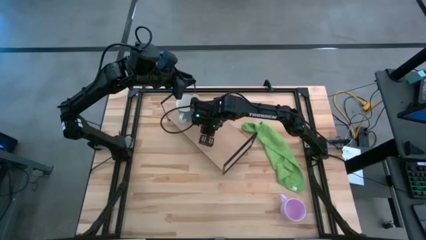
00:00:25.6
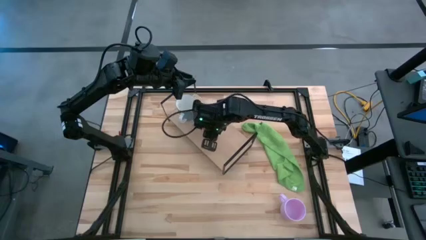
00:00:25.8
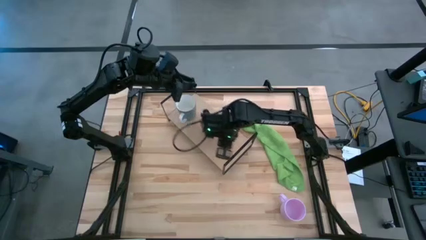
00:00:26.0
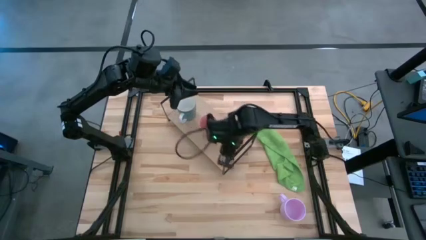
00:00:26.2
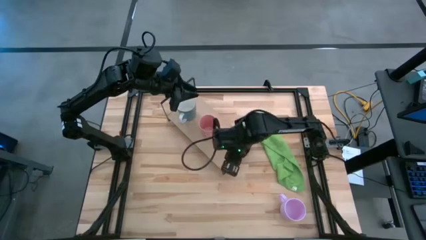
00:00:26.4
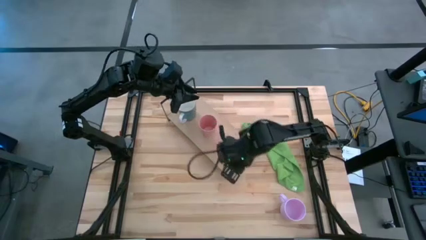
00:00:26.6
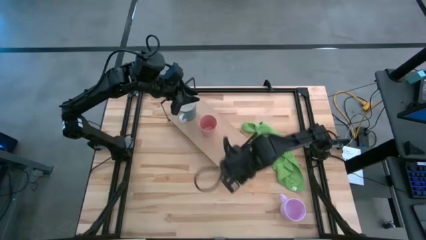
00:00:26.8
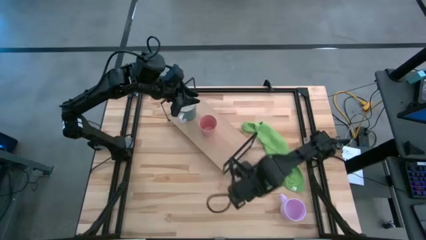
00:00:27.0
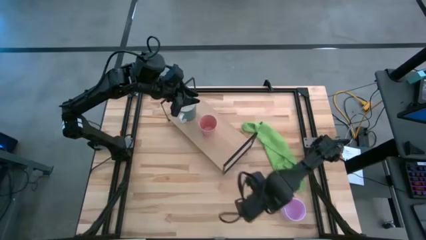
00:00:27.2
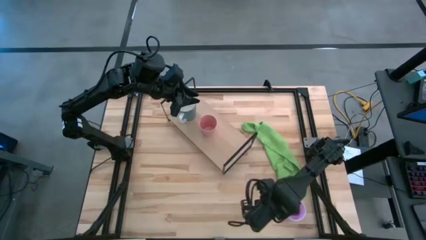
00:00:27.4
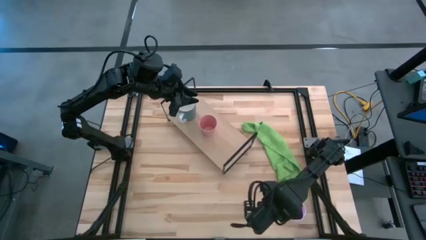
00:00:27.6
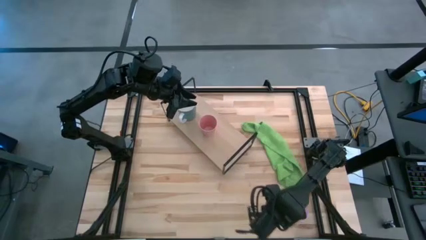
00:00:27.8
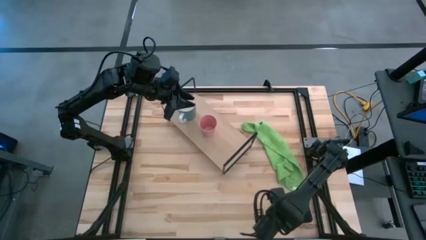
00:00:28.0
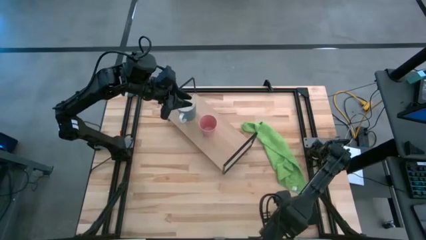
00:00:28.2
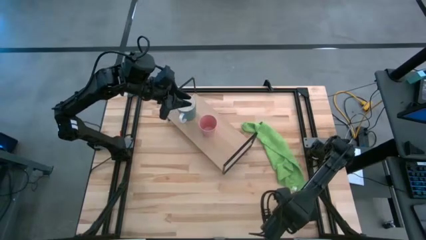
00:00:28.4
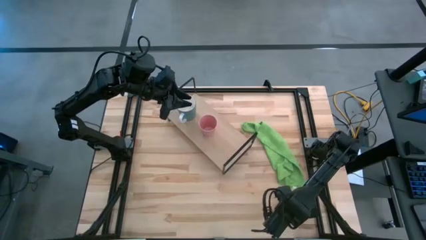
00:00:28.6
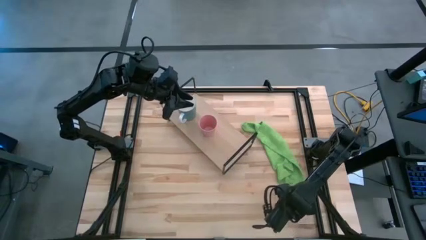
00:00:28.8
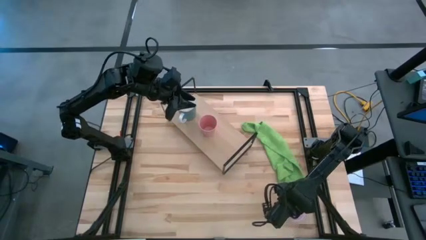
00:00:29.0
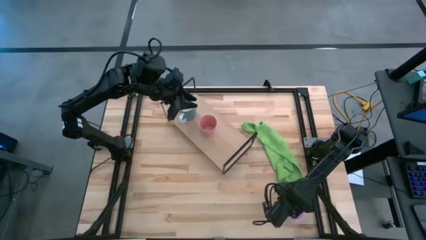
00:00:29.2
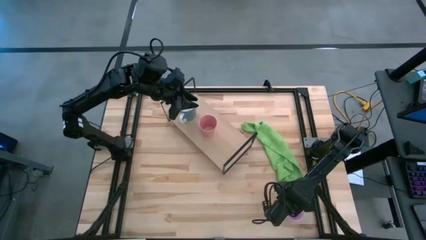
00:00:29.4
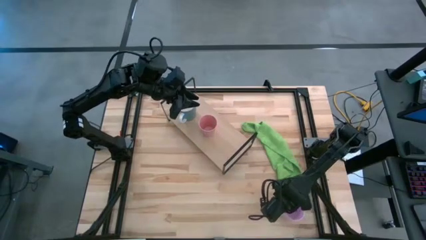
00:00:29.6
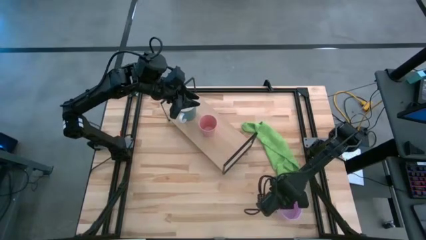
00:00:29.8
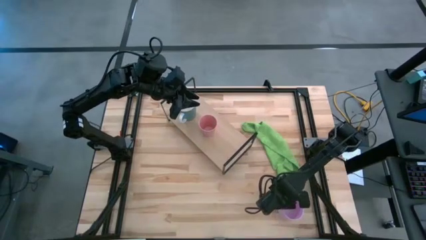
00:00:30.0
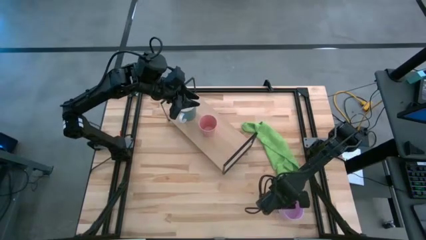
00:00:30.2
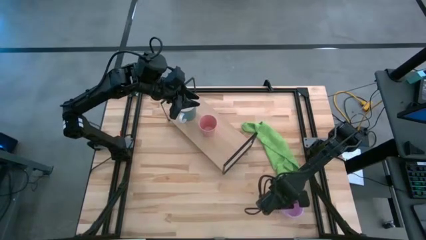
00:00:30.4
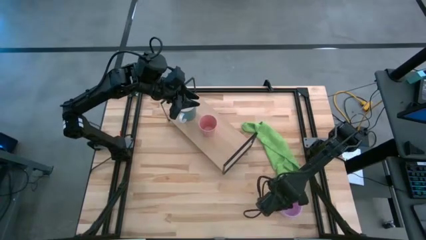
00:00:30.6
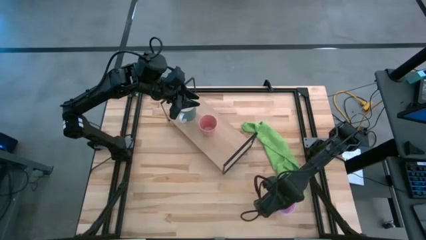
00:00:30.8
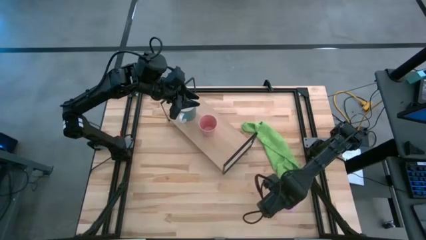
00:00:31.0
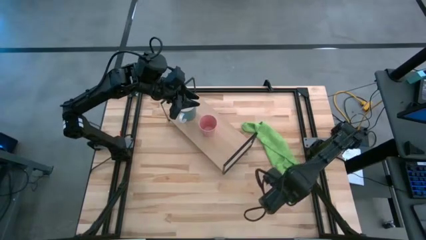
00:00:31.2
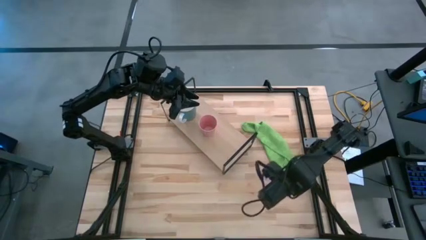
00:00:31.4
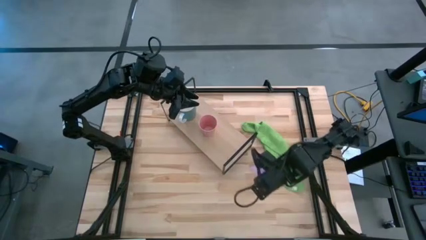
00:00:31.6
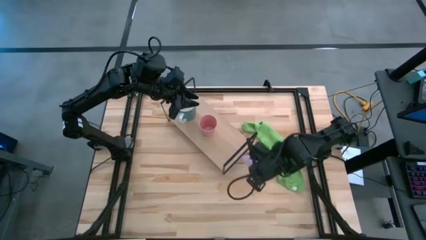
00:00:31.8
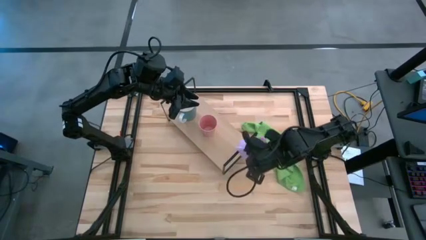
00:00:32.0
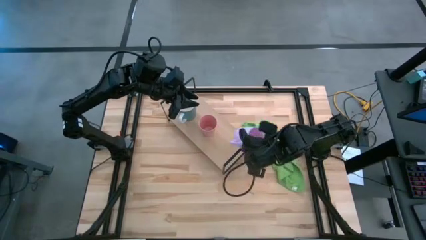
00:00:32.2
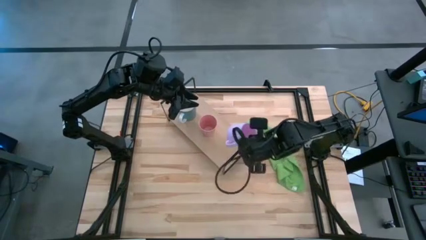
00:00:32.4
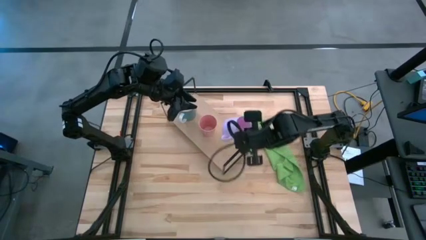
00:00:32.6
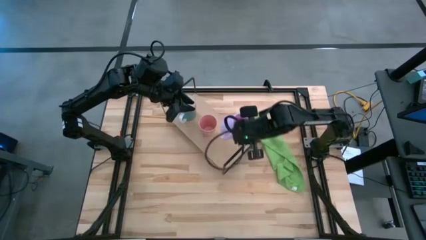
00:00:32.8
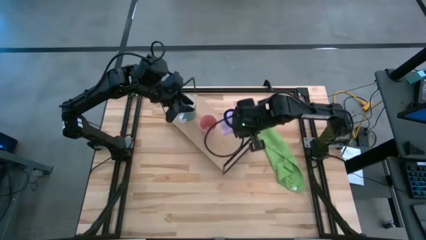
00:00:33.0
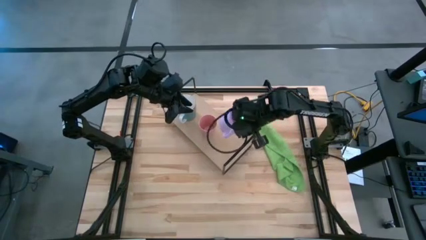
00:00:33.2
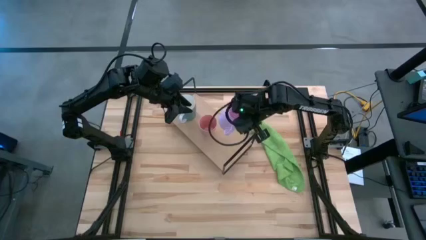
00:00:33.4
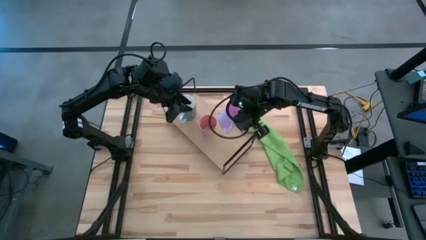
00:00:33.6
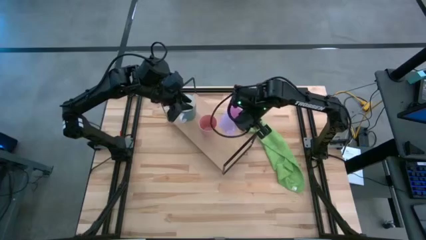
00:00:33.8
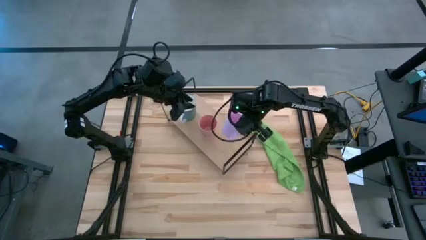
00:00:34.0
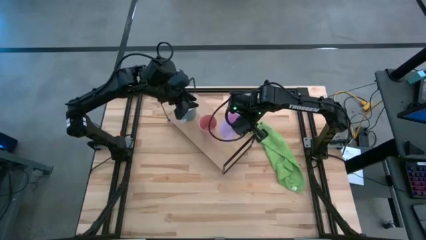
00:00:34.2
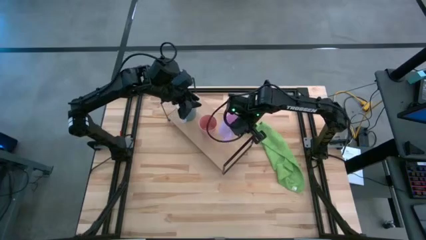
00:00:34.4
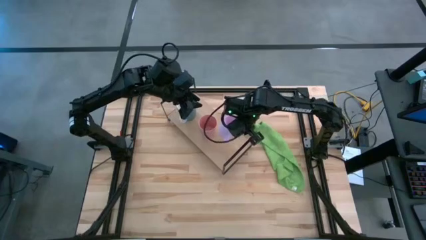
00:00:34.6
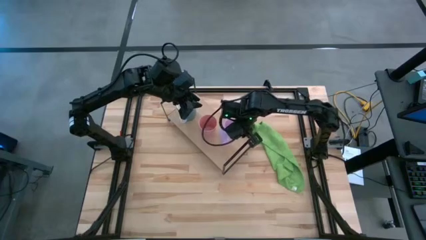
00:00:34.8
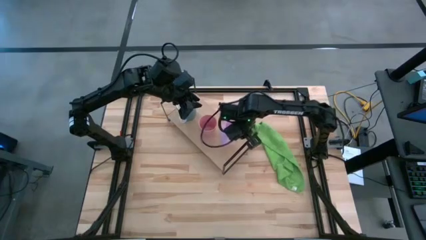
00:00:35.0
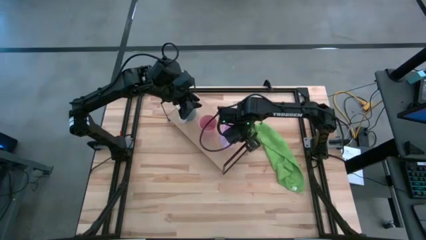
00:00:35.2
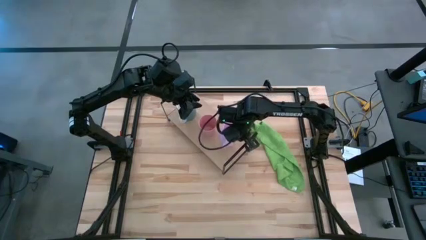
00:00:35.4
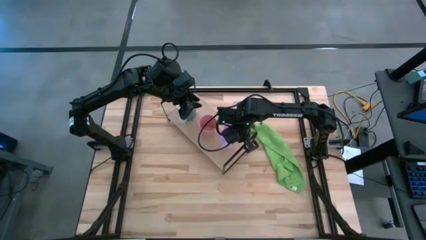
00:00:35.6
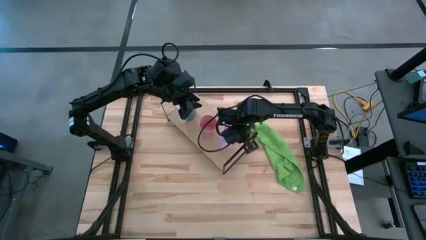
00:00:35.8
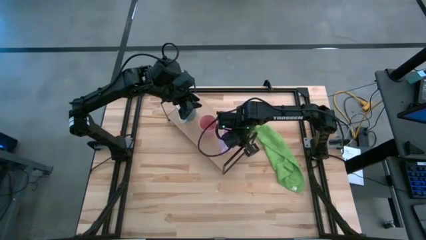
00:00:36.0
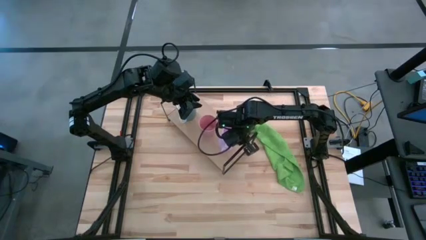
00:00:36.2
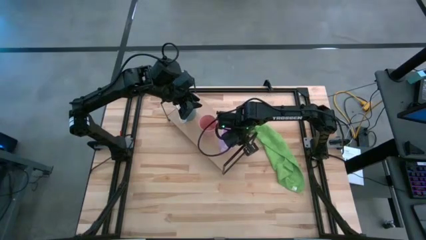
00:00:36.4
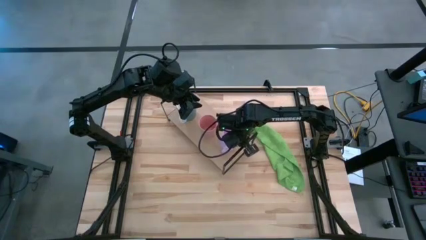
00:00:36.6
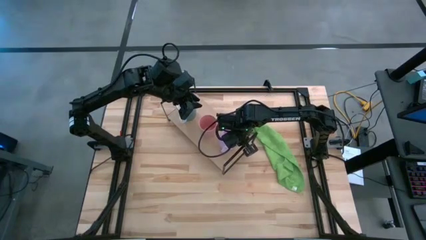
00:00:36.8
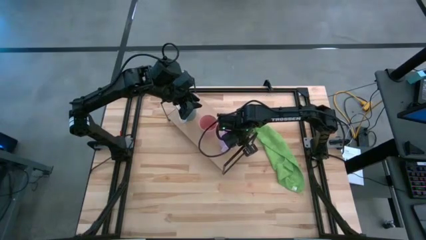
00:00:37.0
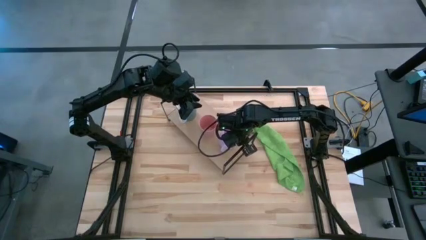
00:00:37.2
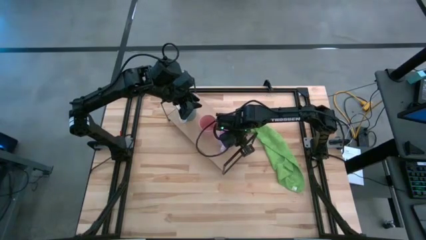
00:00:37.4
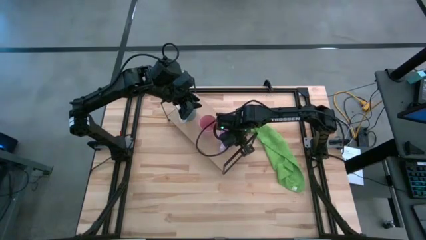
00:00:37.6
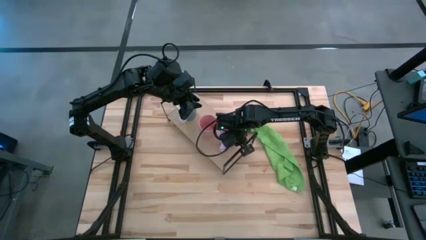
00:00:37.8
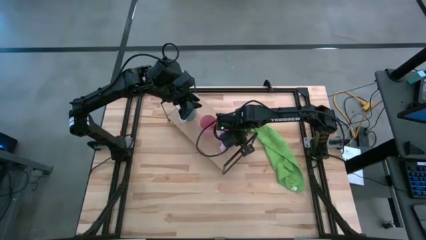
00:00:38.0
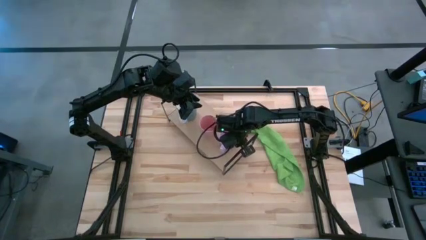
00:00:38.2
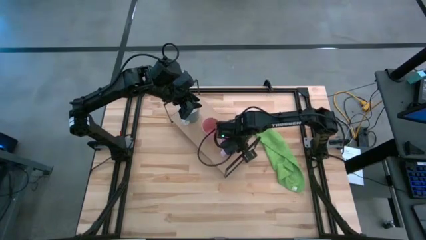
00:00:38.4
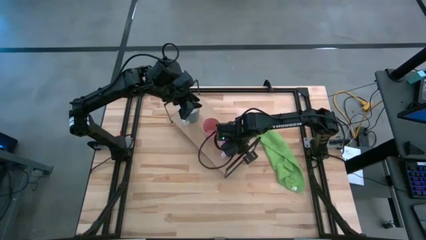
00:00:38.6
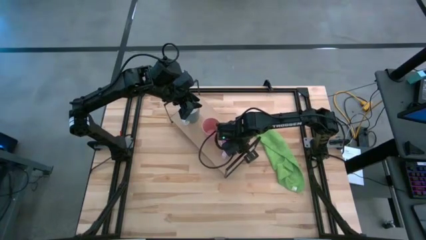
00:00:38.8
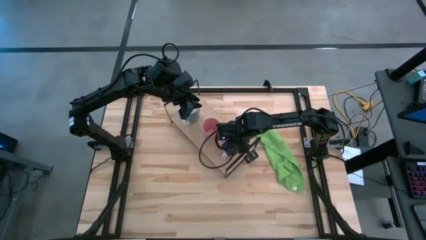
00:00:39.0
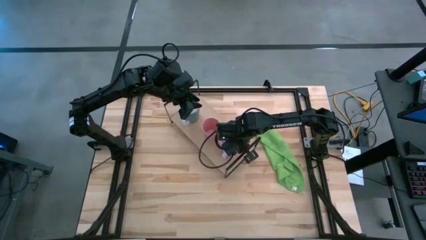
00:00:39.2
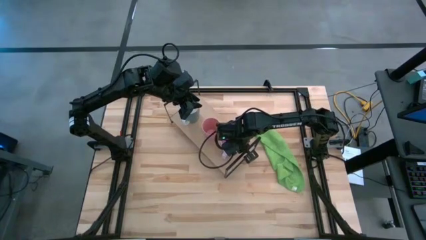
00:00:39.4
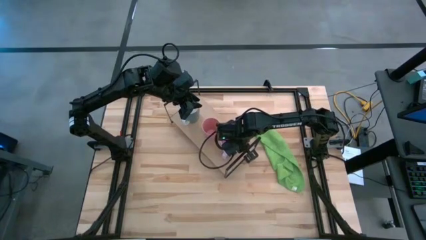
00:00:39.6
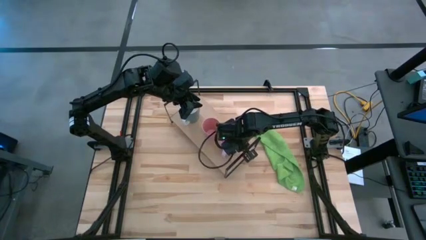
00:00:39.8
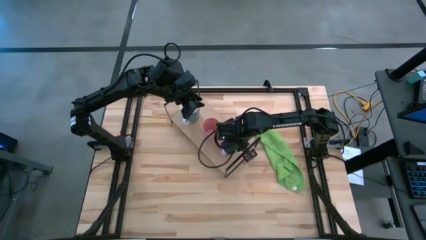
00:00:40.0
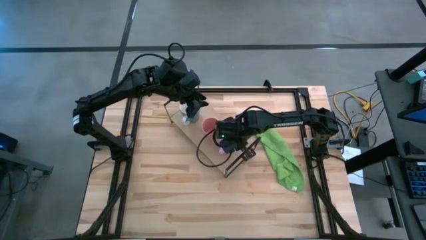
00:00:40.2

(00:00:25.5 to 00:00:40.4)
Task: Stack small to large cups/mugs on shelf
Put the light pink mug on the shelf
